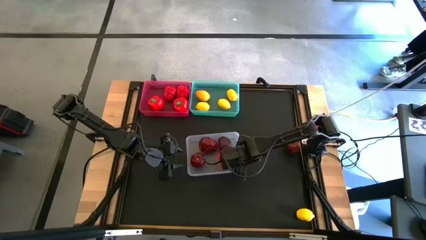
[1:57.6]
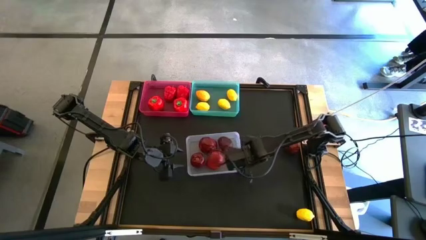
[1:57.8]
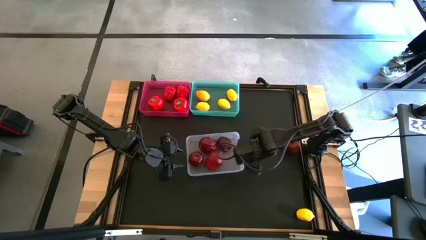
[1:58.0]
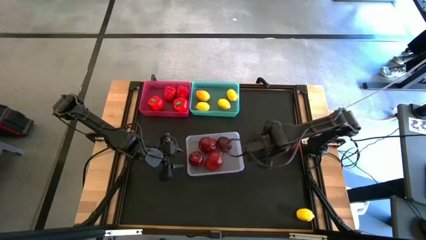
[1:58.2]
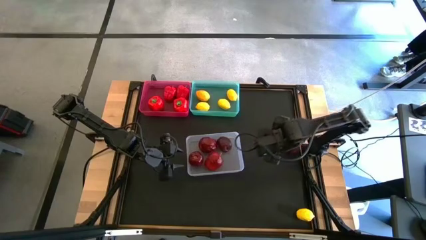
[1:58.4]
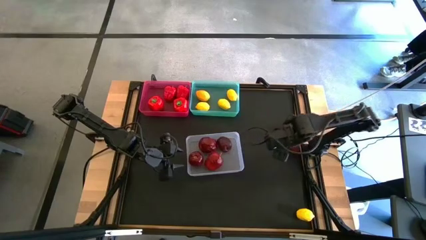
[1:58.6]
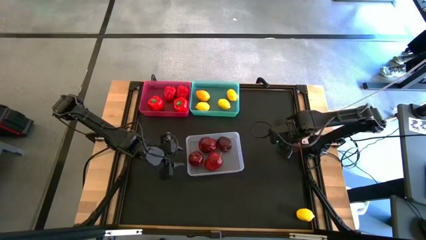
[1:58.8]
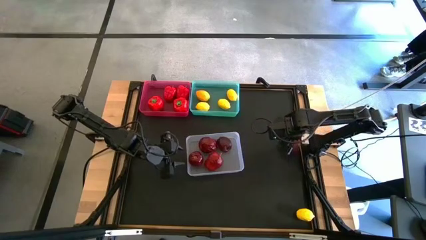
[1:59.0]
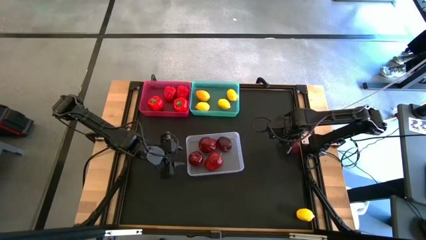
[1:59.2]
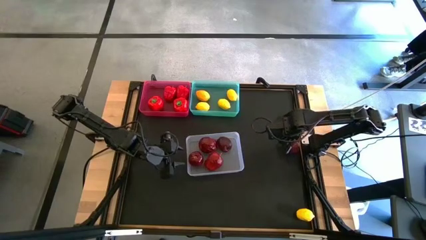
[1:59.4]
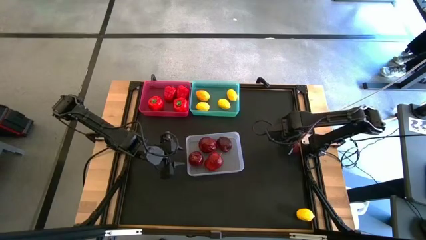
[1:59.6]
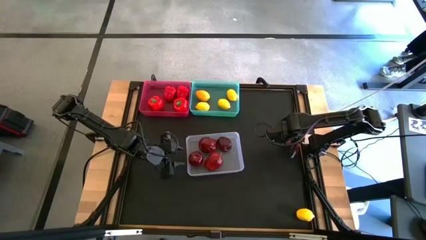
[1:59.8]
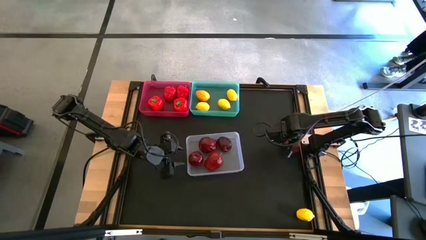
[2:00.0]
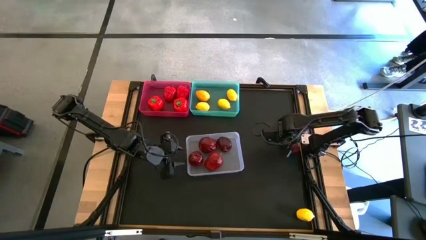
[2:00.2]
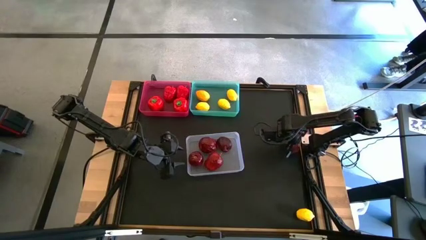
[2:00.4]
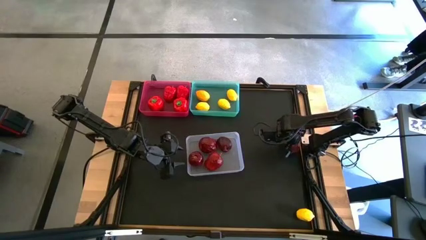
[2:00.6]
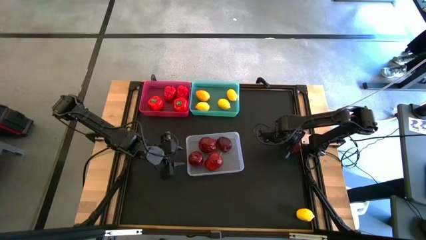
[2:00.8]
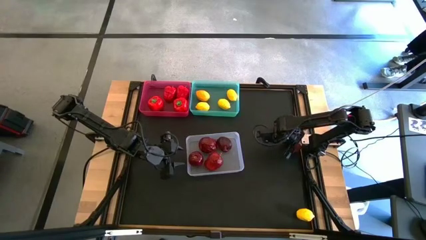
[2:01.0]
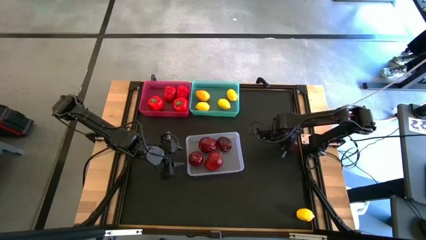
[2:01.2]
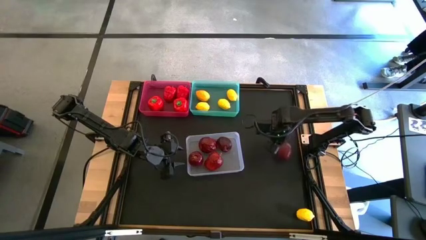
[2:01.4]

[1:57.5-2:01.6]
Task: Sort produce into baskets
Put the dark red apple into the transparent bin

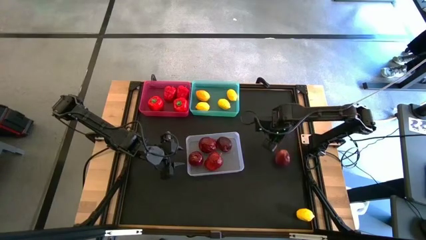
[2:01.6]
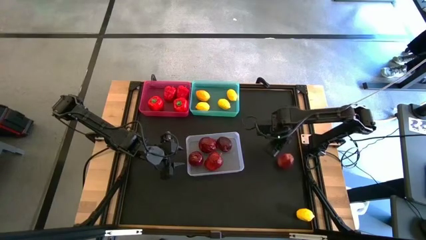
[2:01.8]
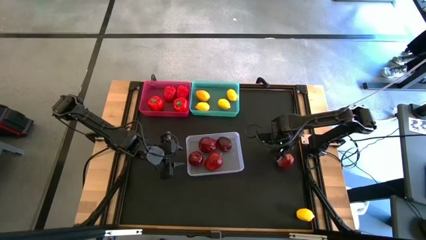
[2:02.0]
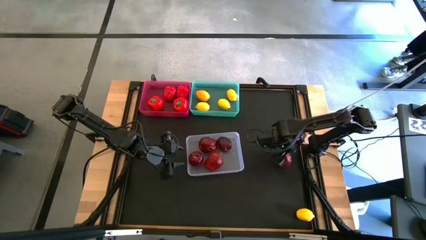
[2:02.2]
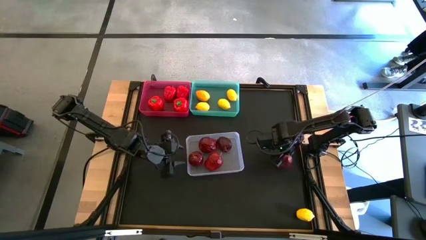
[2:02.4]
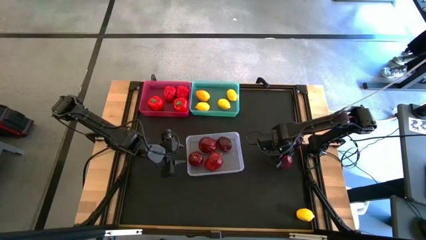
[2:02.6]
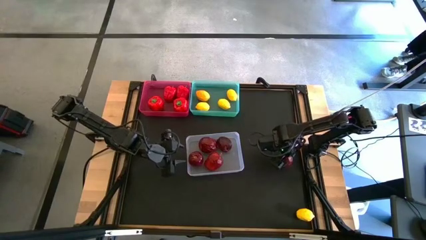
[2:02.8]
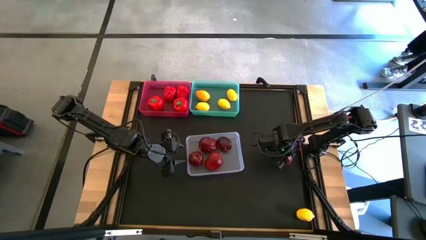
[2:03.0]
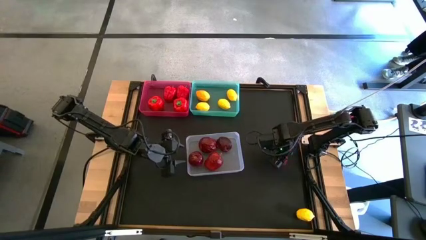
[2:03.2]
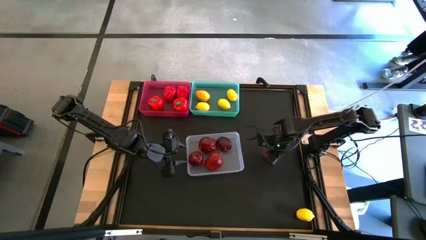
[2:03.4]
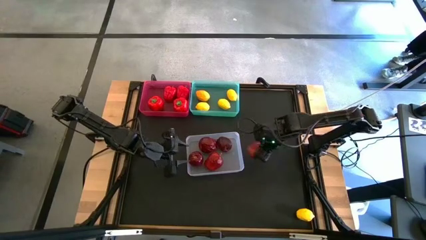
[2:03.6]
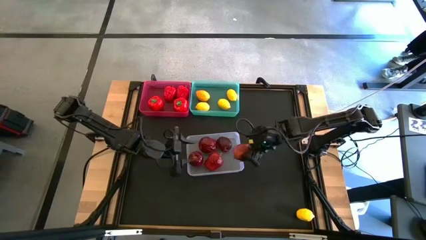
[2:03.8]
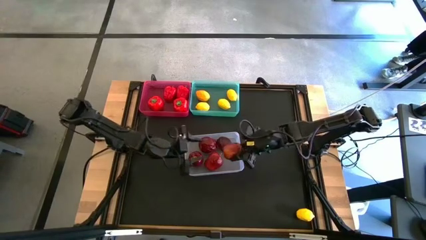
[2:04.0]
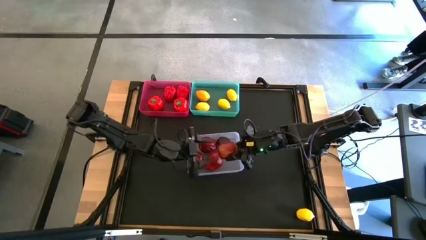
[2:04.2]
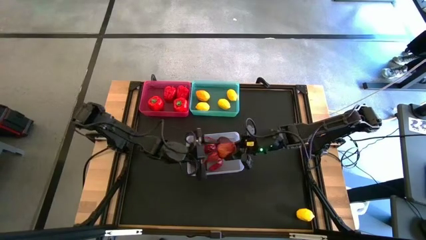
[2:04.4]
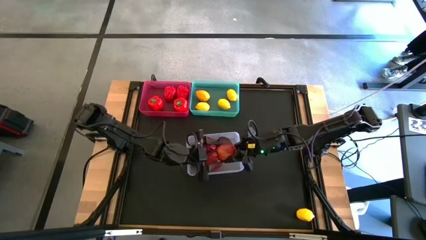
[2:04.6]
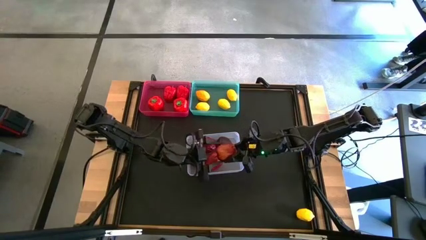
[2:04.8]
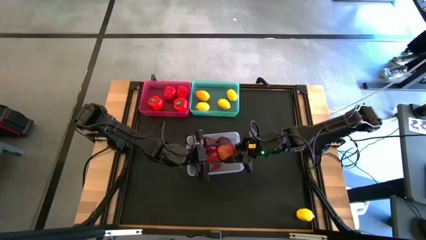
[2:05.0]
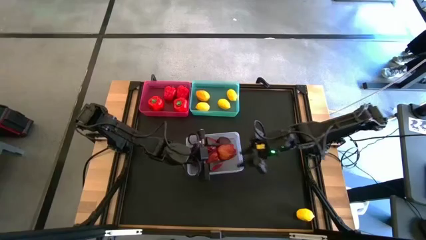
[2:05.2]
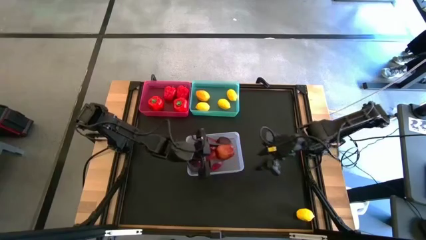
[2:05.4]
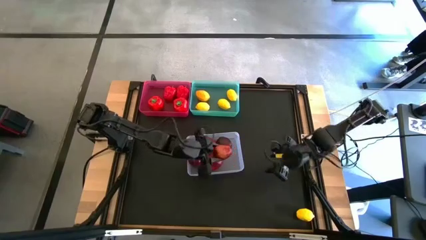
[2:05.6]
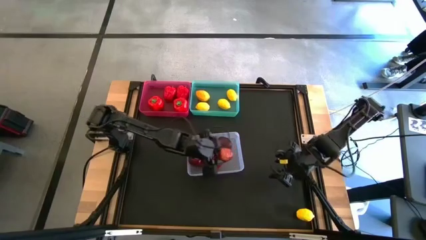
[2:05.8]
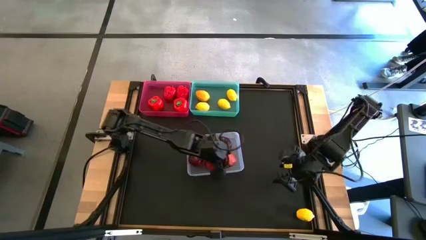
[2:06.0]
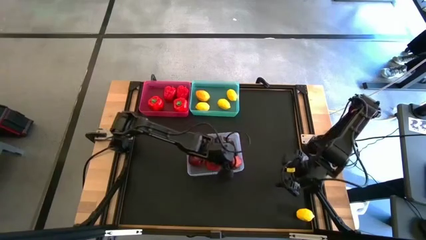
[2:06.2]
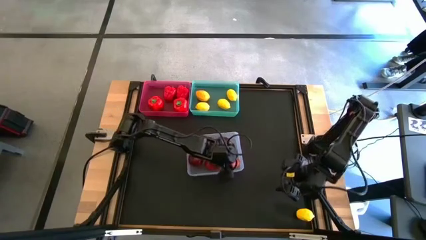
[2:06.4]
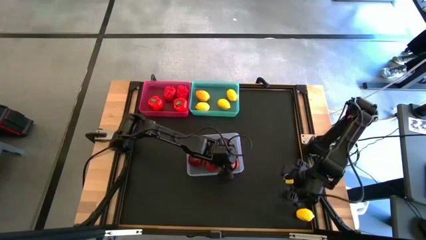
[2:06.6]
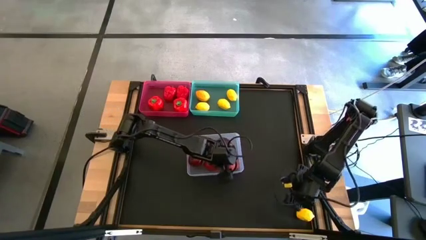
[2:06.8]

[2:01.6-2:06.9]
Put the dark red apple into the transparent bin

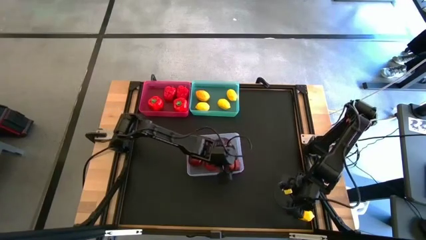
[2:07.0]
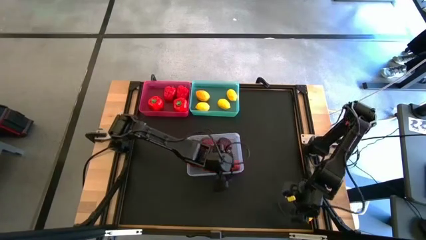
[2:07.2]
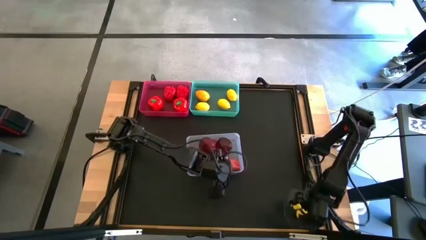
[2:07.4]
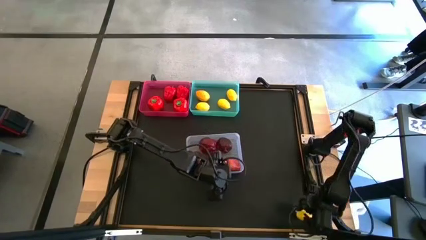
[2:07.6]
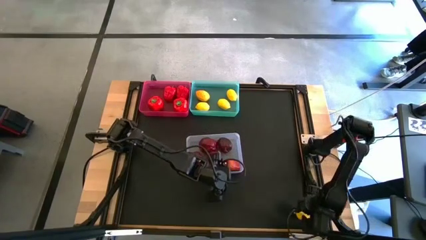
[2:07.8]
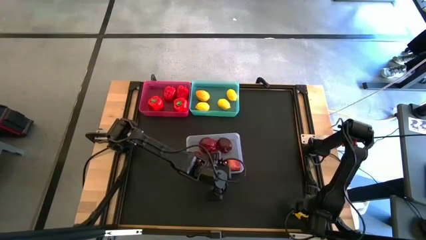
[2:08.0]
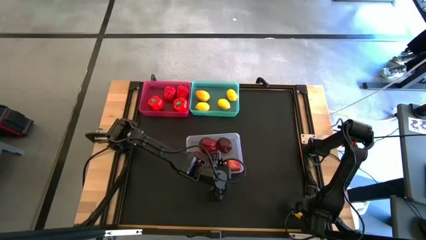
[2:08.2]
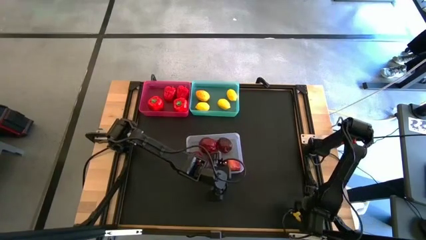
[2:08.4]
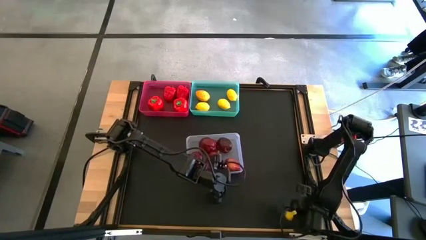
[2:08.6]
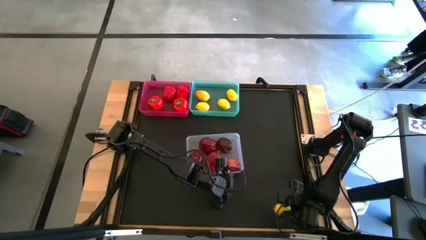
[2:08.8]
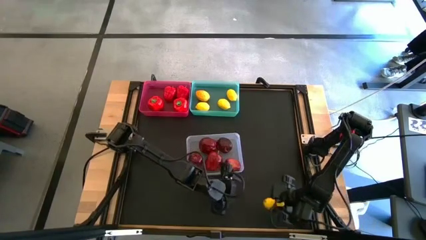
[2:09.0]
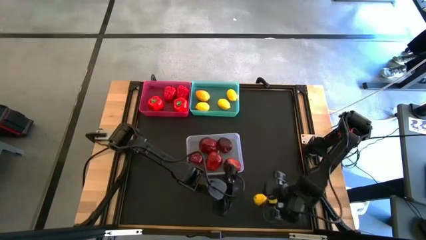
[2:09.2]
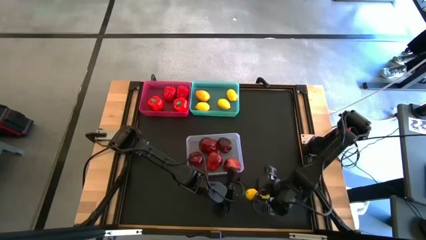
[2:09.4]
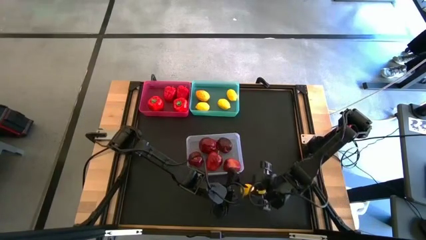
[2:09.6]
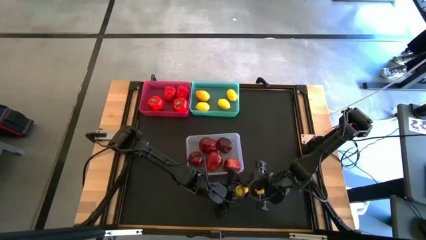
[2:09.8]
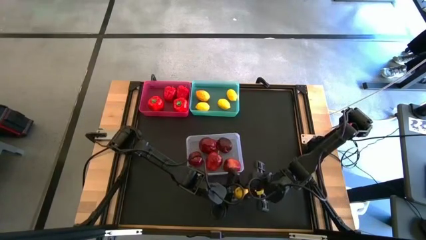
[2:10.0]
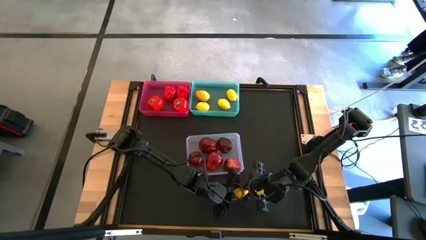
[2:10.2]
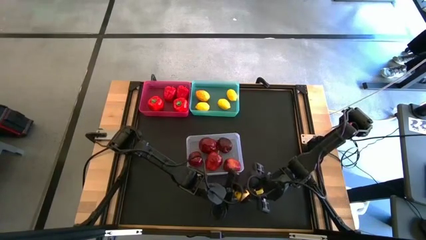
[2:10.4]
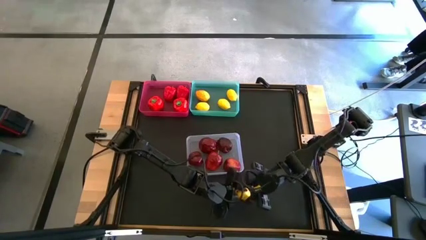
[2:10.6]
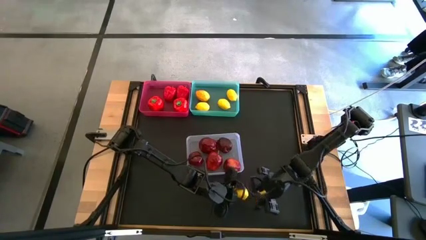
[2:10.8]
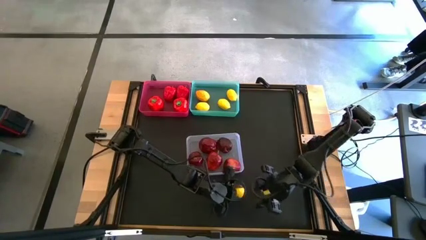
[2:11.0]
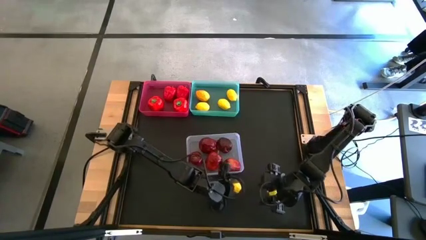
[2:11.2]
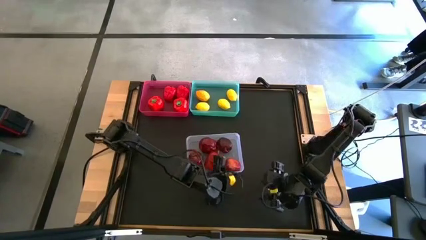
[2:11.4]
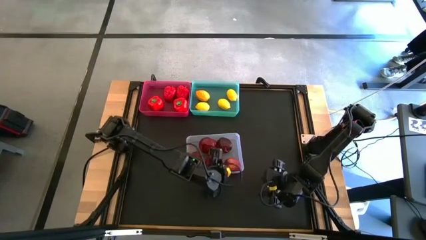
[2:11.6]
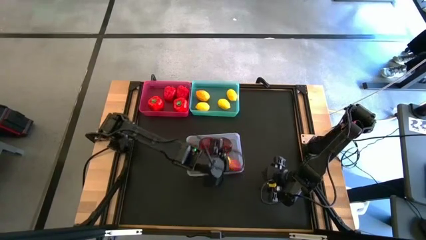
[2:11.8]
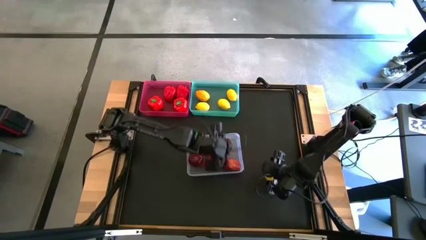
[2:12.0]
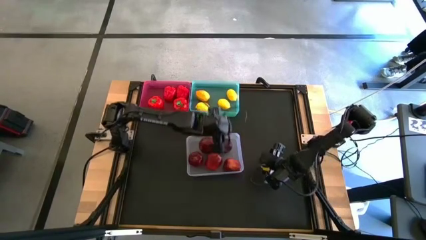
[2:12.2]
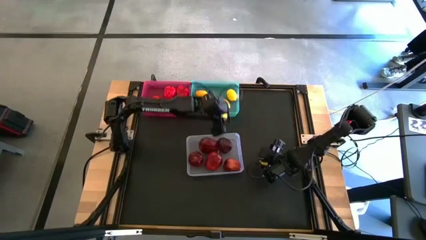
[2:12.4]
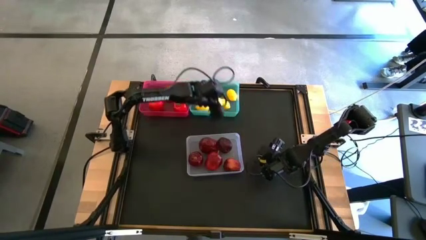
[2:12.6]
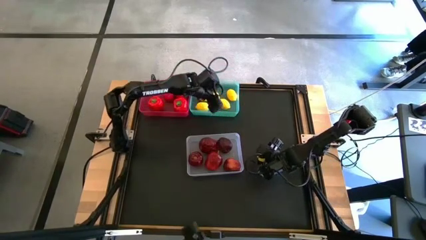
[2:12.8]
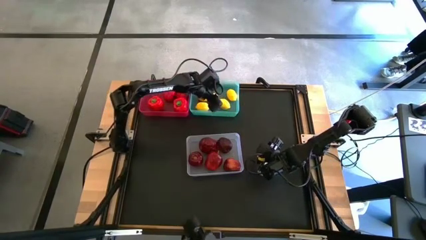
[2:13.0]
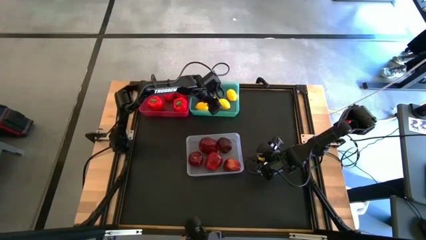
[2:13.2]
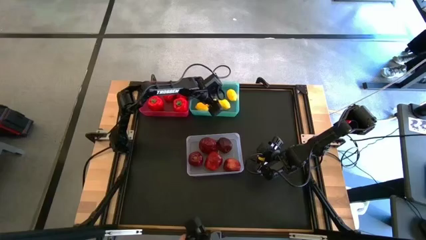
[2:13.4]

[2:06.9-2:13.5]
Put the yellow lemon into the blue bin
